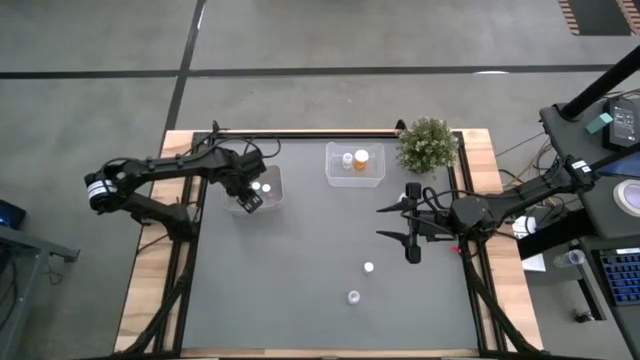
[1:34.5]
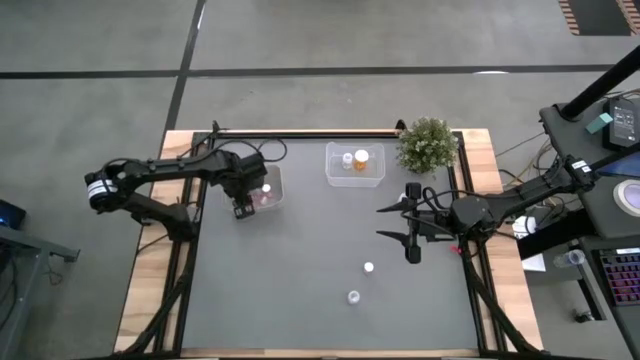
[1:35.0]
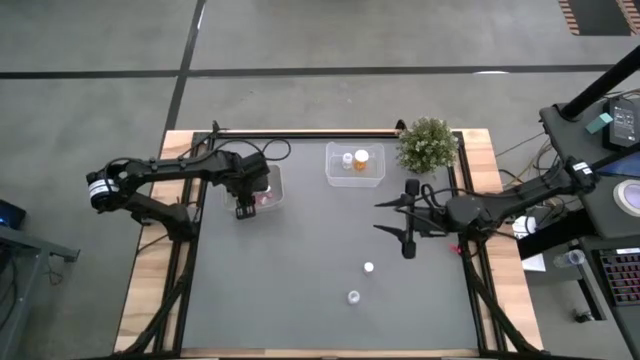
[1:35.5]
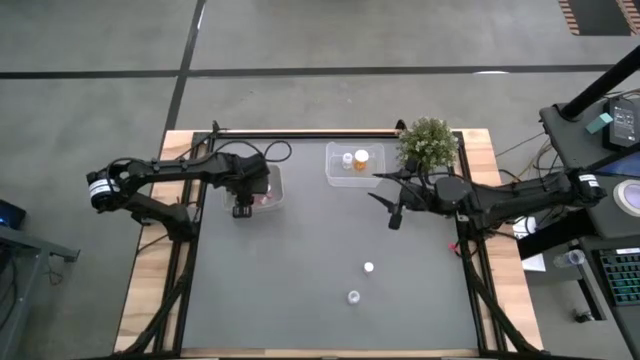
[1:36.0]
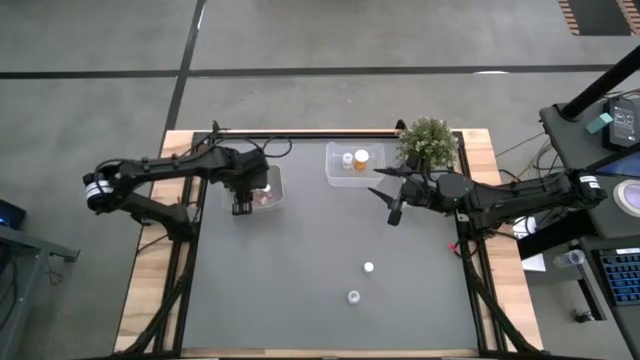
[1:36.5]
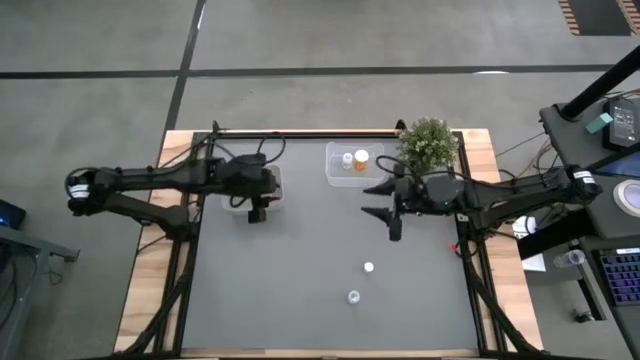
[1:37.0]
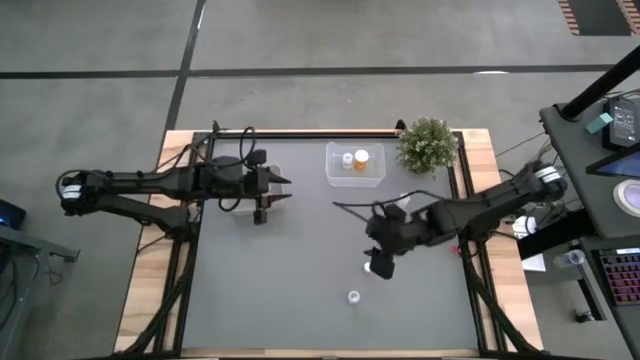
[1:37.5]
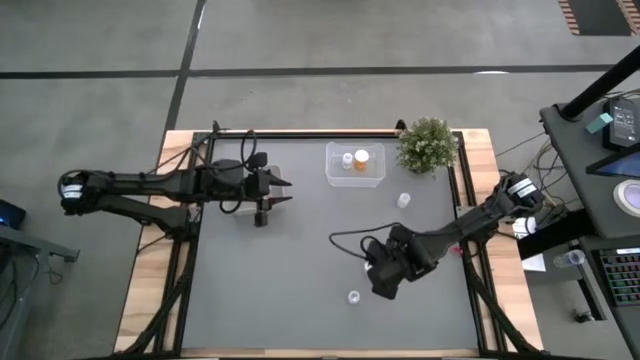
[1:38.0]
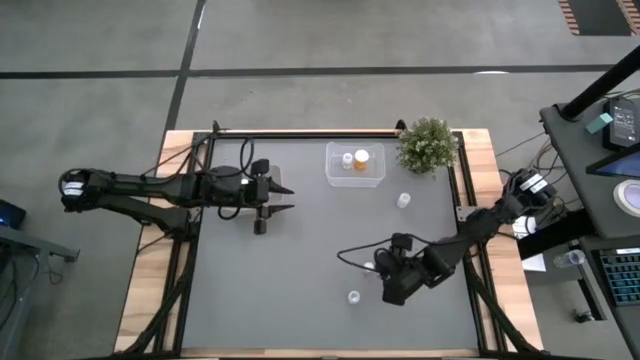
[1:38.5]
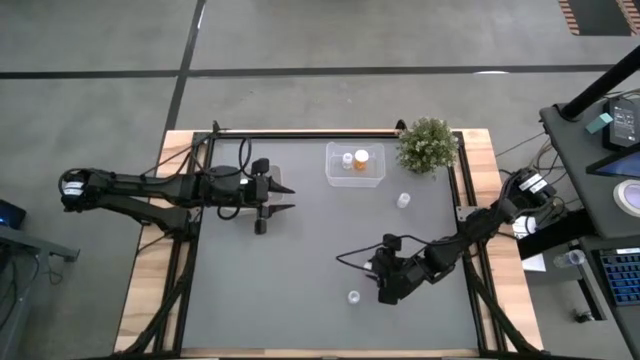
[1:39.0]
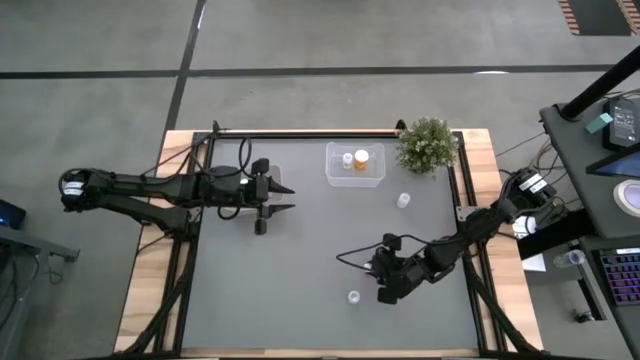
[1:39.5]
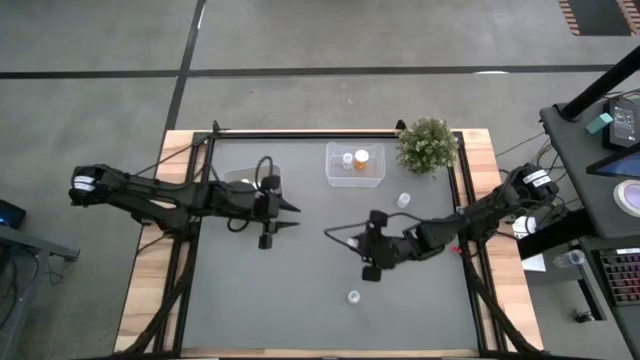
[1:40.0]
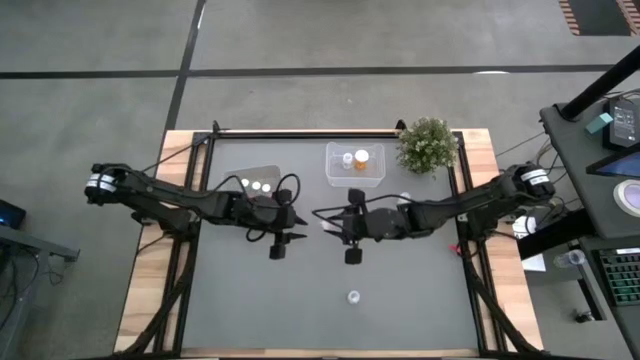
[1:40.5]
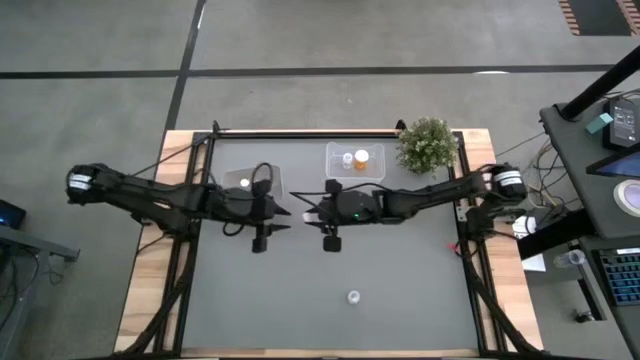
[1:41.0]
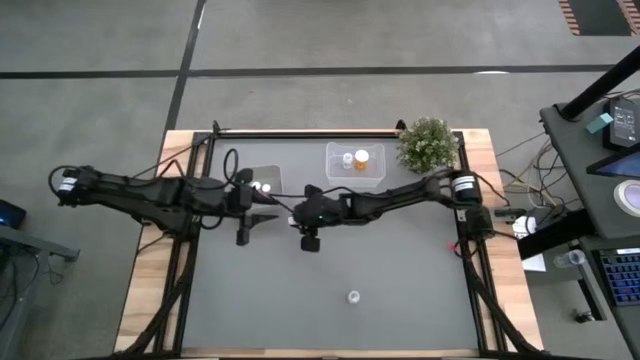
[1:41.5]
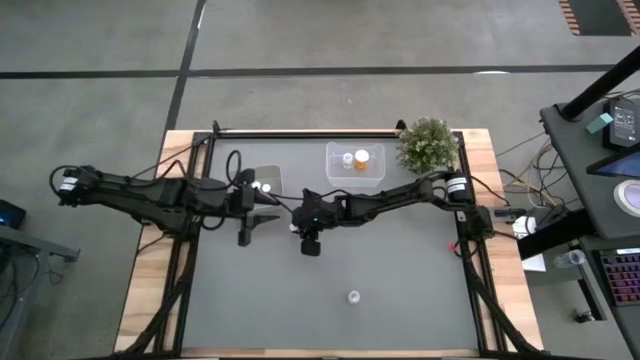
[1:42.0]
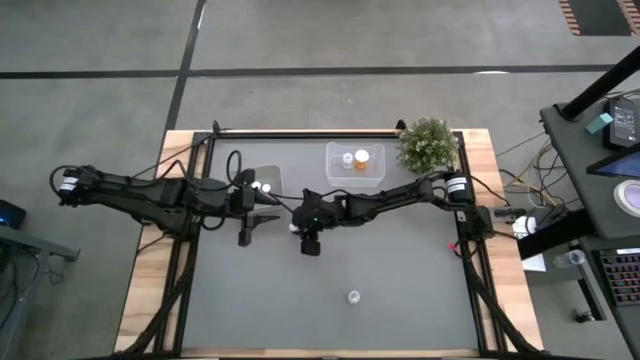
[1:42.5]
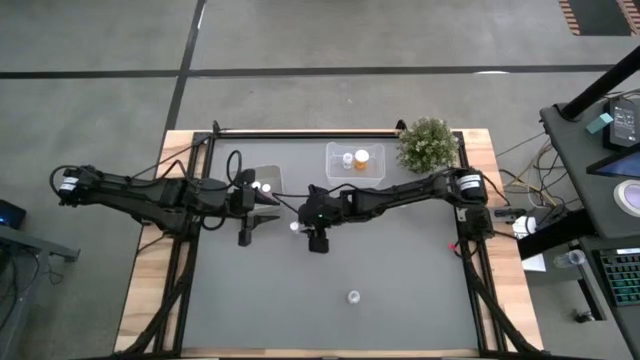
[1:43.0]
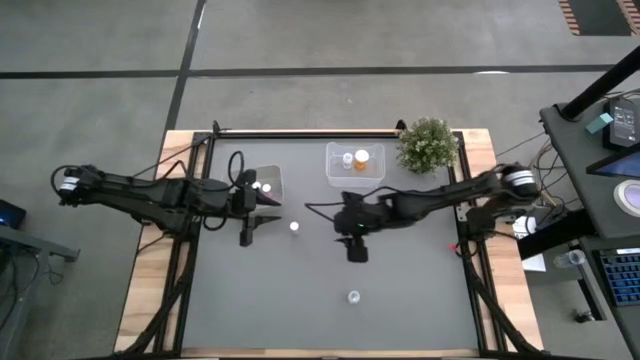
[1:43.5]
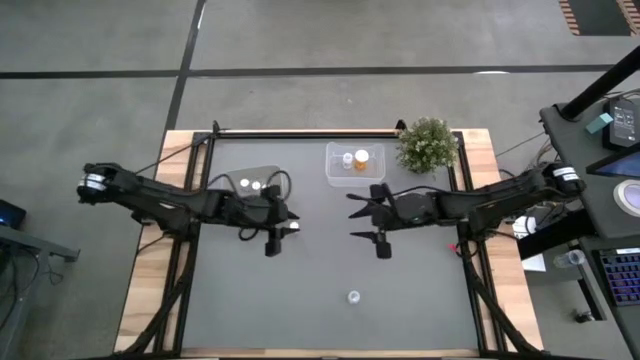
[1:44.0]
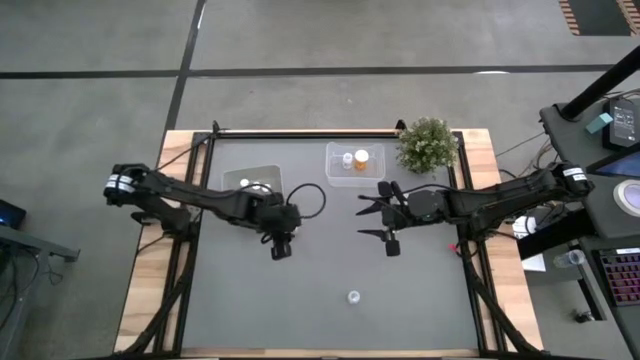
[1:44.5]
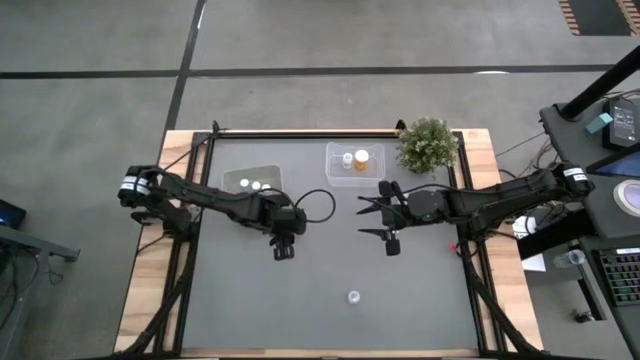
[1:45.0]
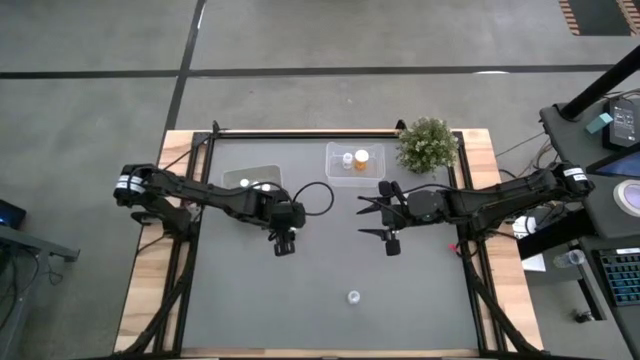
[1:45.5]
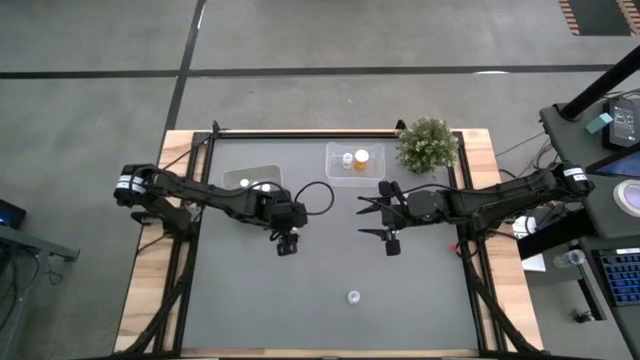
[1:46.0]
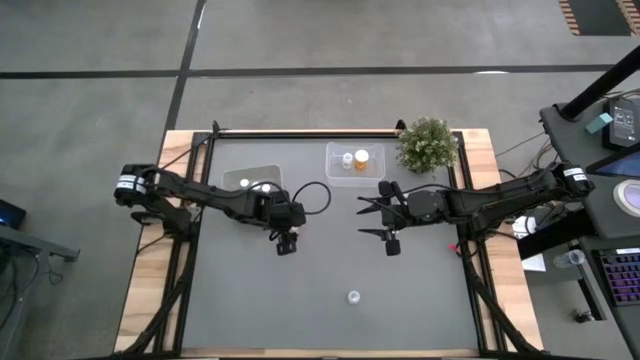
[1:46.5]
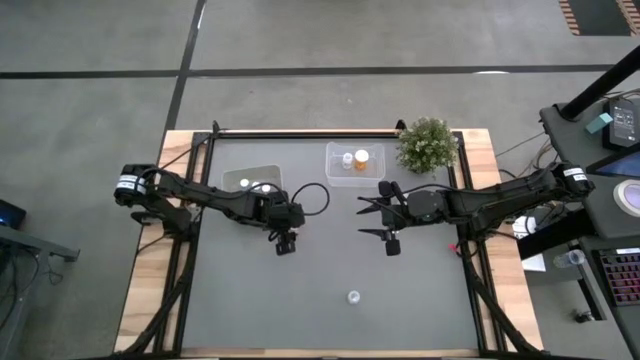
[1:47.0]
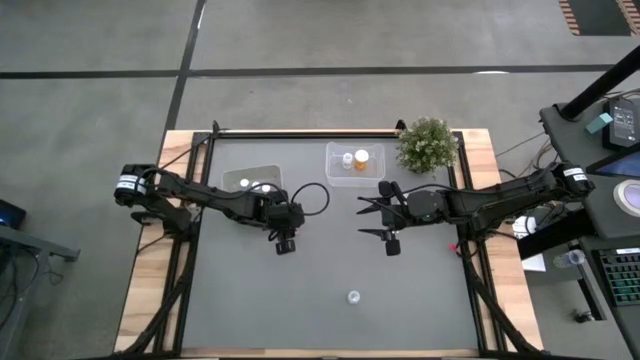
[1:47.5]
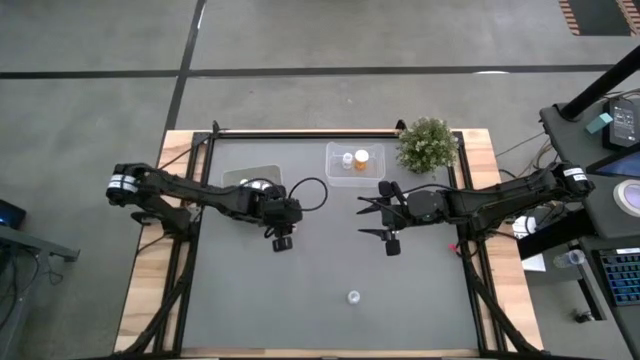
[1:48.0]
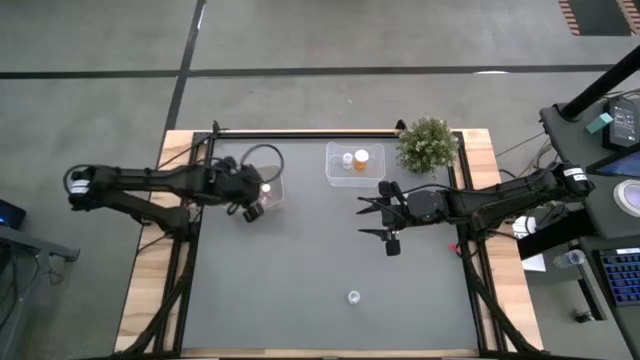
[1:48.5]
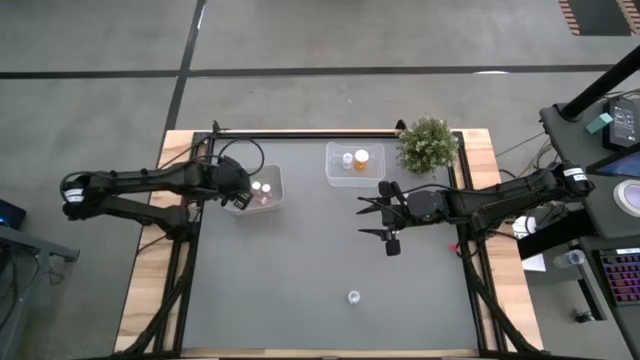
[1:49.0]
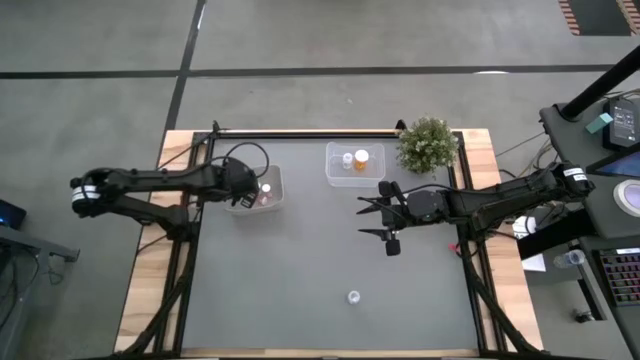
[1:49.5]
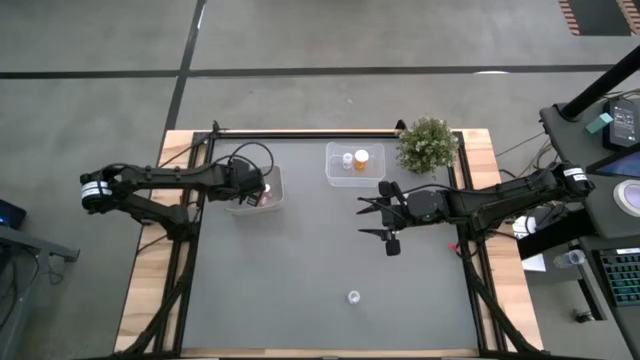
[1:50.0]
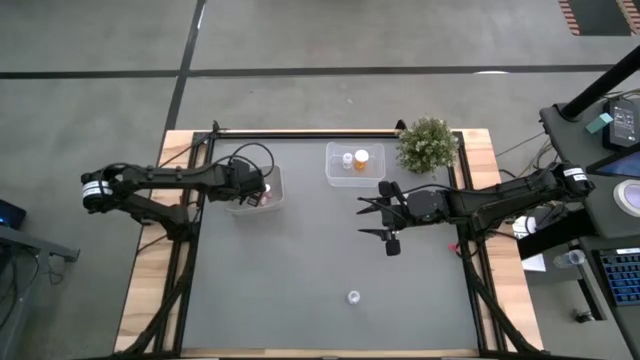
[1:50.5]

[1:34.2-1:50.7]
Task: Pick and place medicine bottles into bin by pill shape (circle, oval)
Put the small pink pill bottle into the gray bin

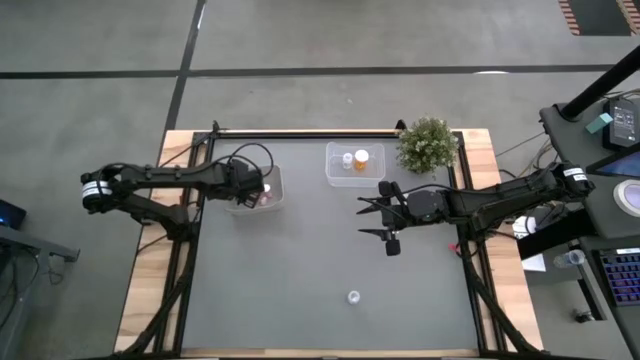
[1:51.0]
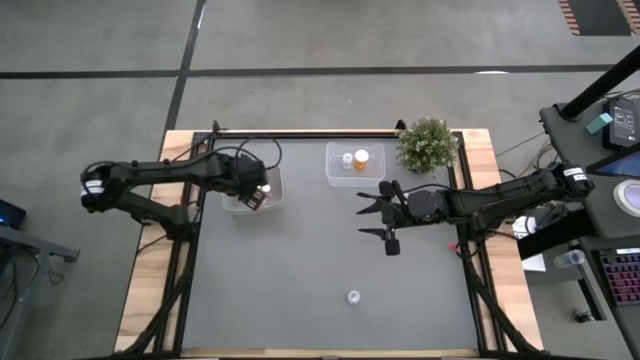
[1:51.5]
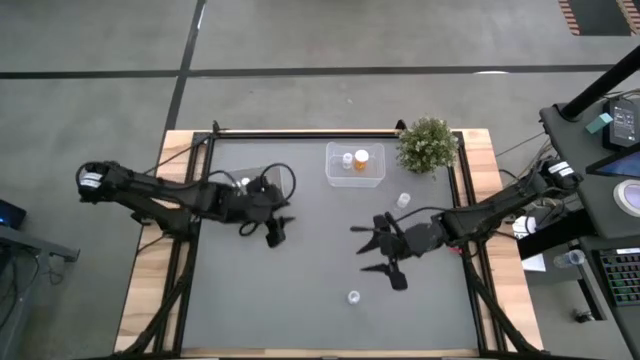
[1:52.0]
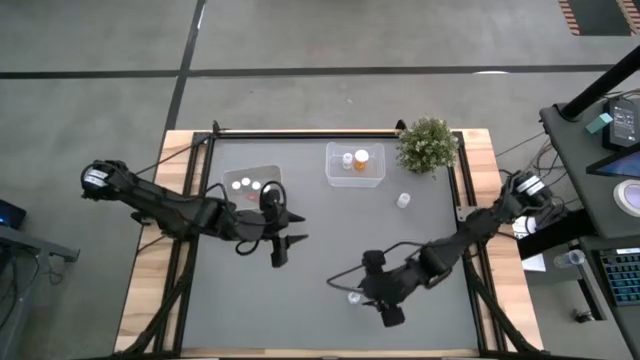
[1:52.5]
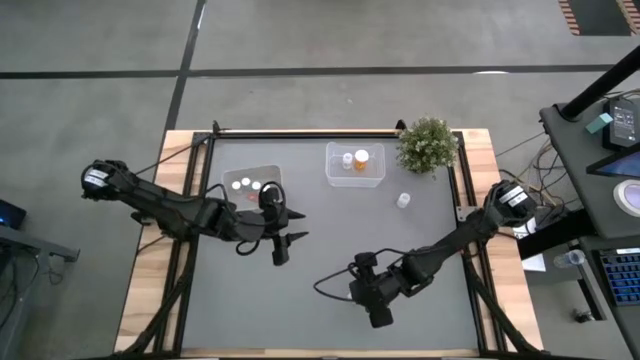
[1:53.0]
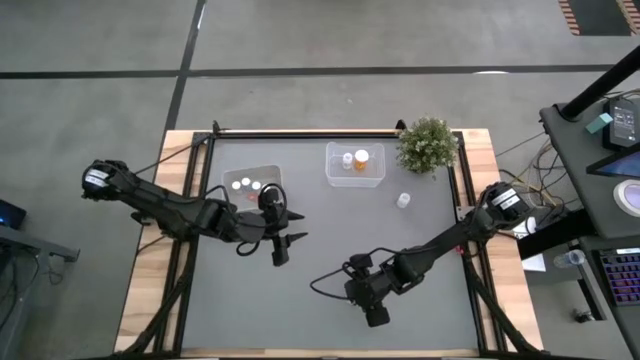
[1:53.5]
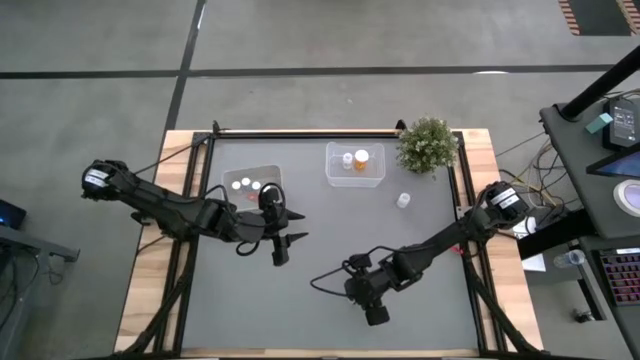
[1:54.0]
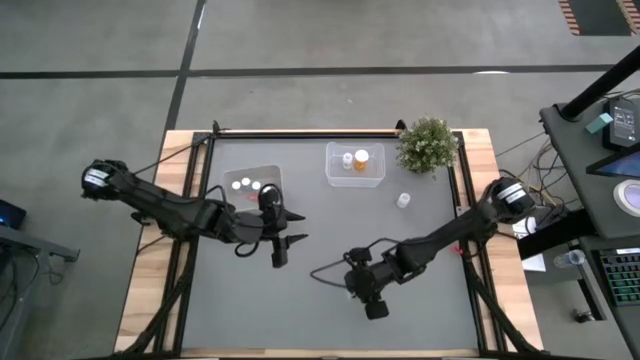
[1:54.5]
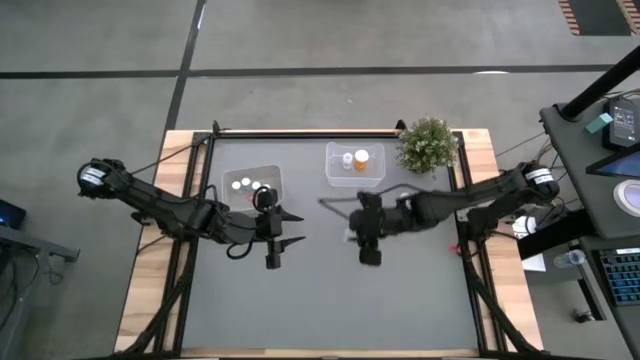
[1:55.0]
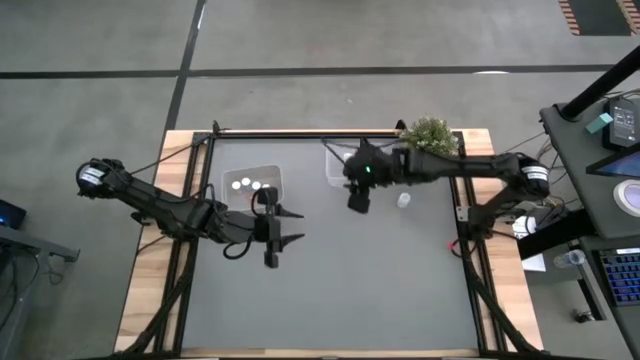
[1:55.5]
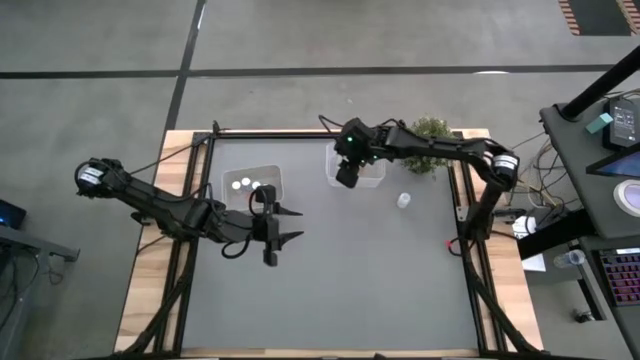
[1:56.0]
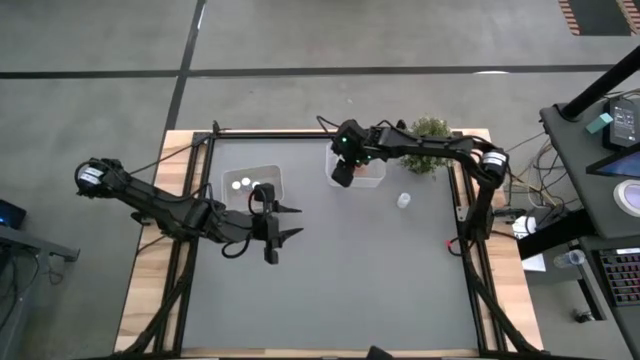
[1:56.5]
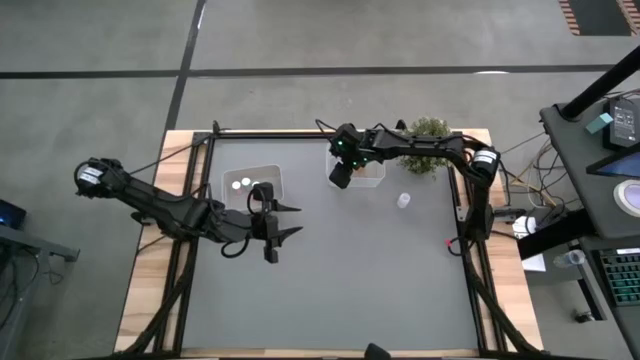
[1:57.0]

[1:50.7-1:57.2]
Put the bottom big transparent pill bottle into the transparent bin
